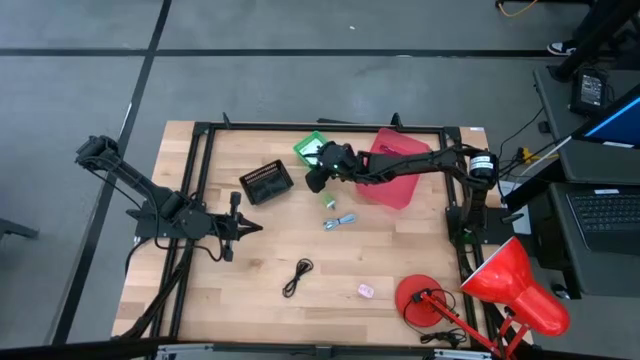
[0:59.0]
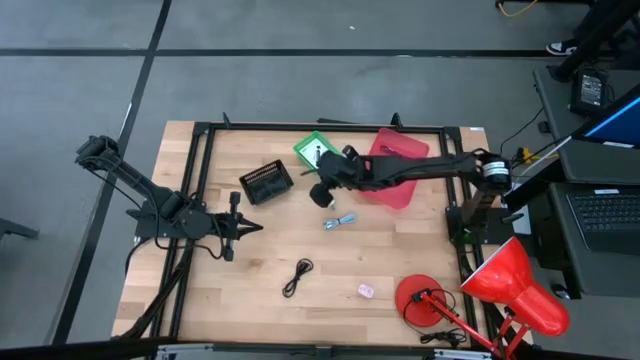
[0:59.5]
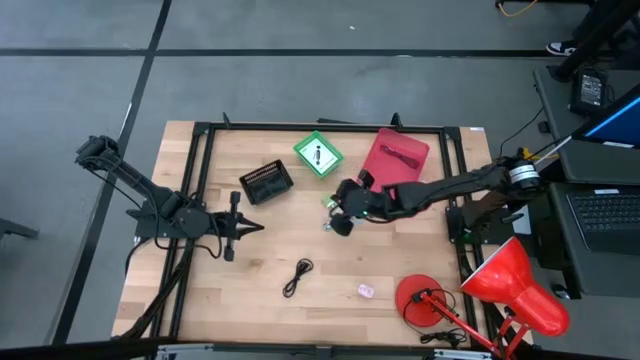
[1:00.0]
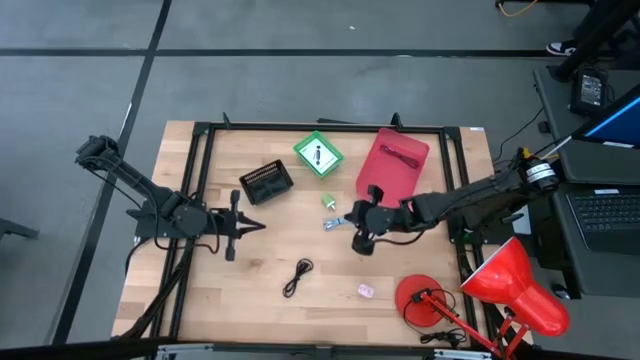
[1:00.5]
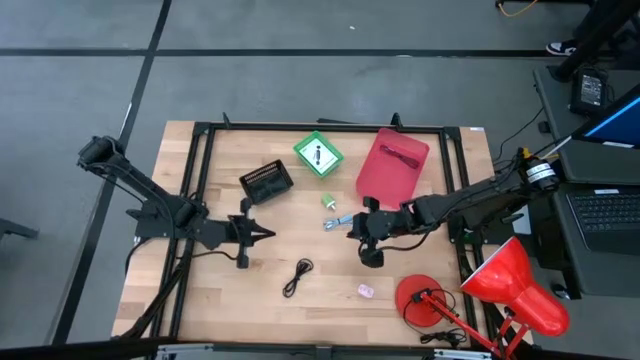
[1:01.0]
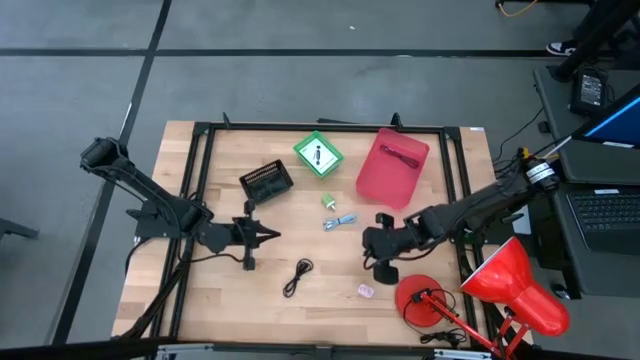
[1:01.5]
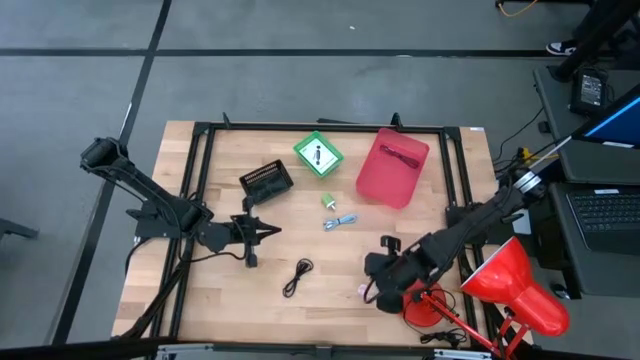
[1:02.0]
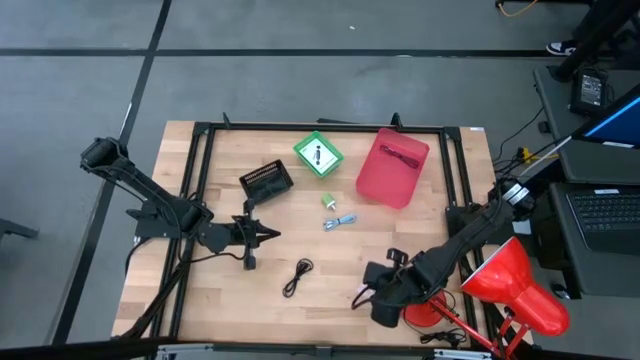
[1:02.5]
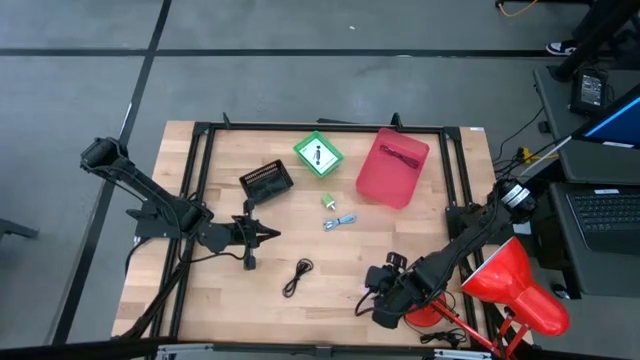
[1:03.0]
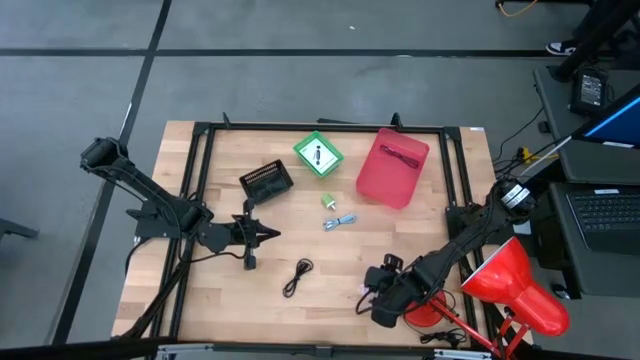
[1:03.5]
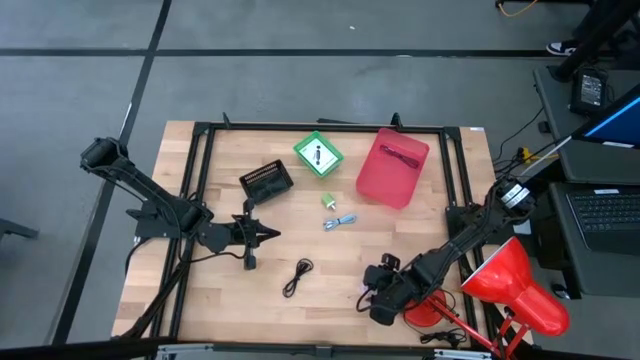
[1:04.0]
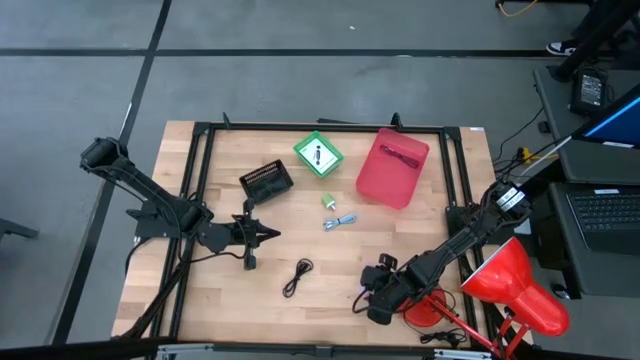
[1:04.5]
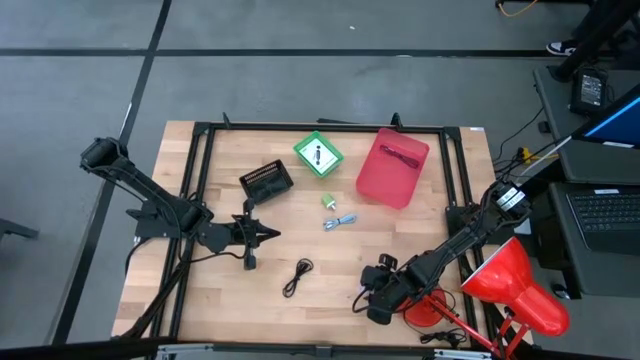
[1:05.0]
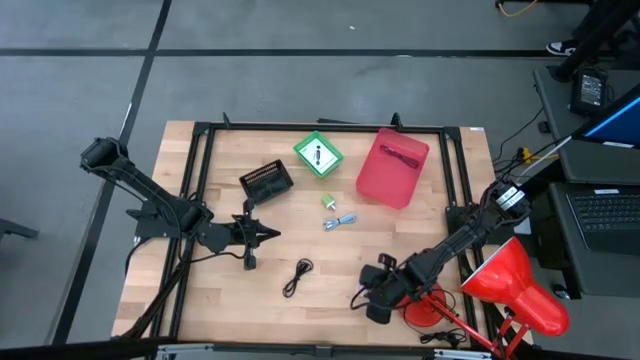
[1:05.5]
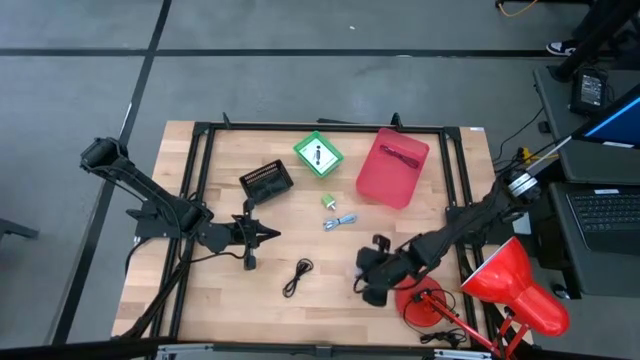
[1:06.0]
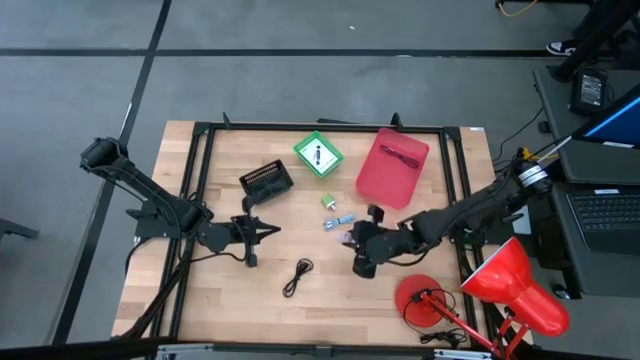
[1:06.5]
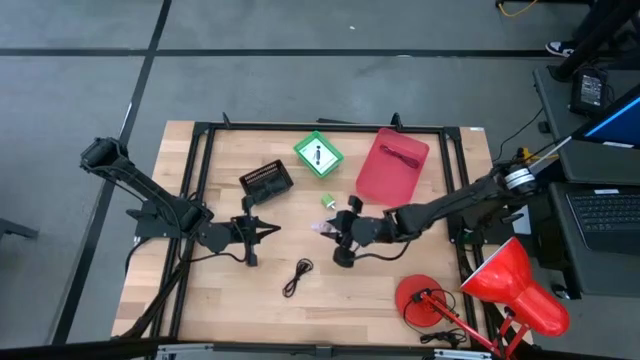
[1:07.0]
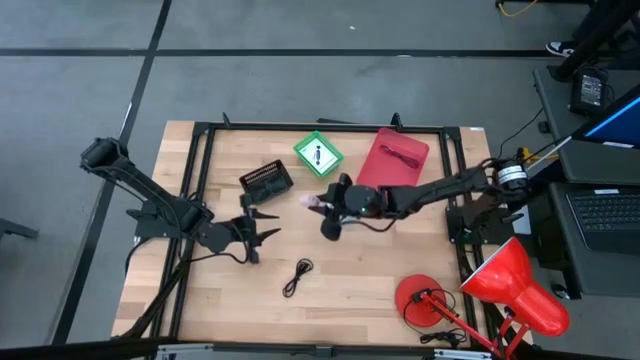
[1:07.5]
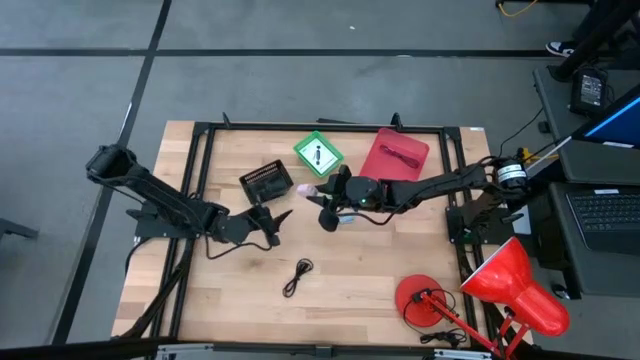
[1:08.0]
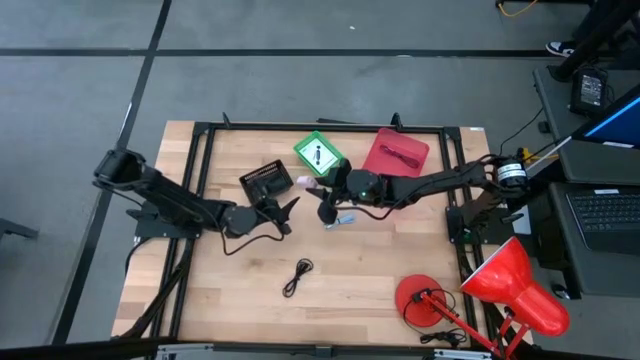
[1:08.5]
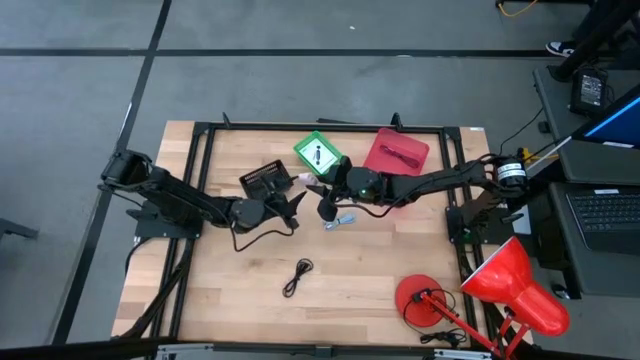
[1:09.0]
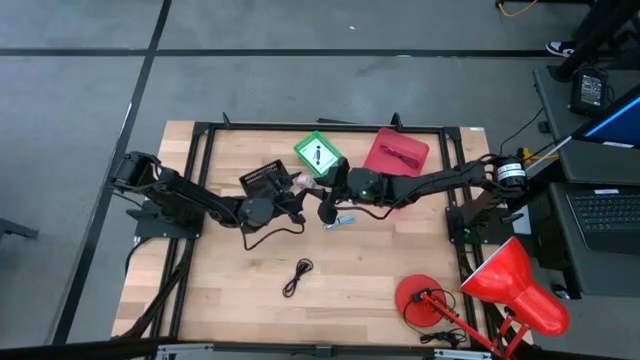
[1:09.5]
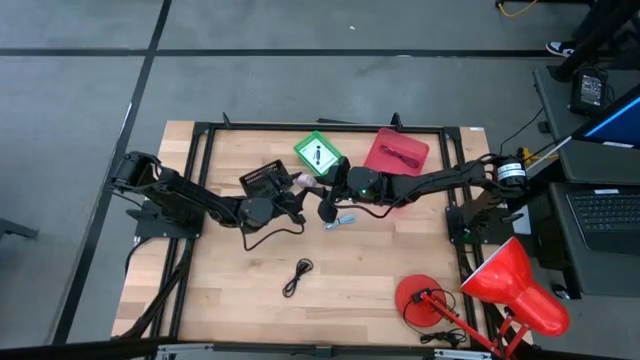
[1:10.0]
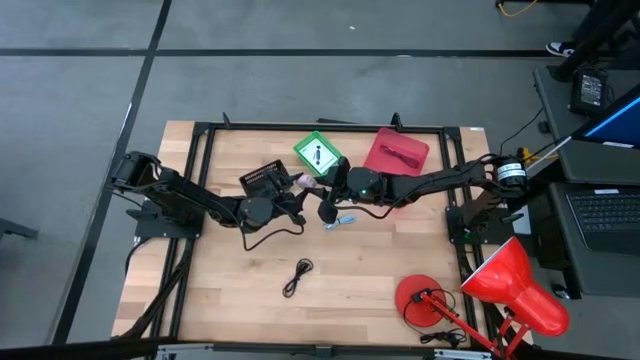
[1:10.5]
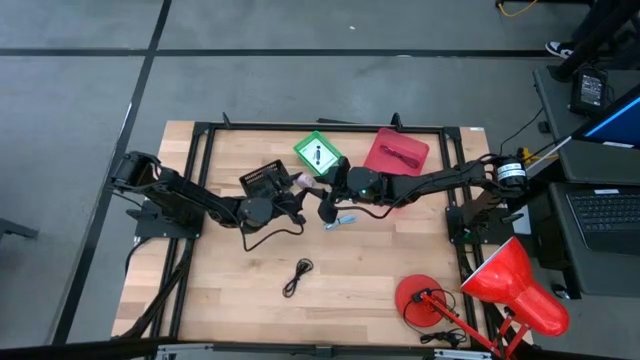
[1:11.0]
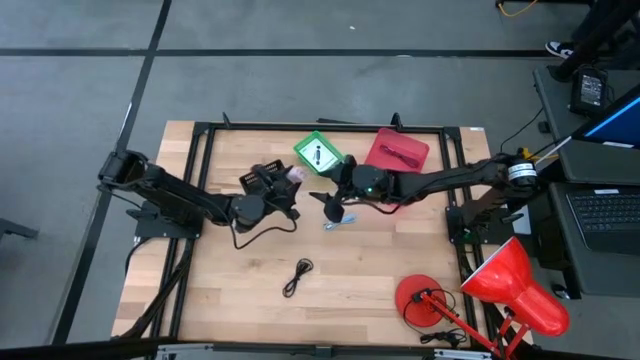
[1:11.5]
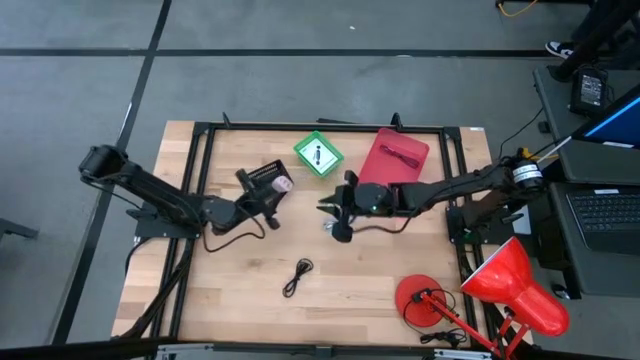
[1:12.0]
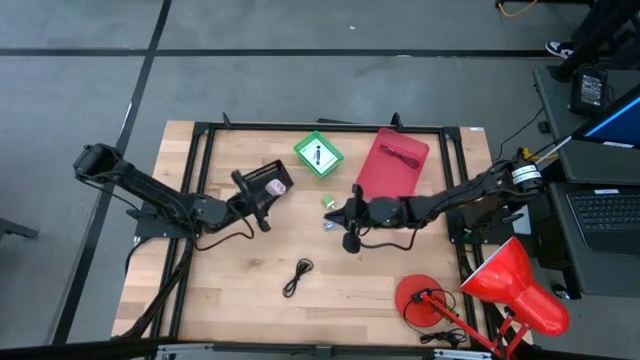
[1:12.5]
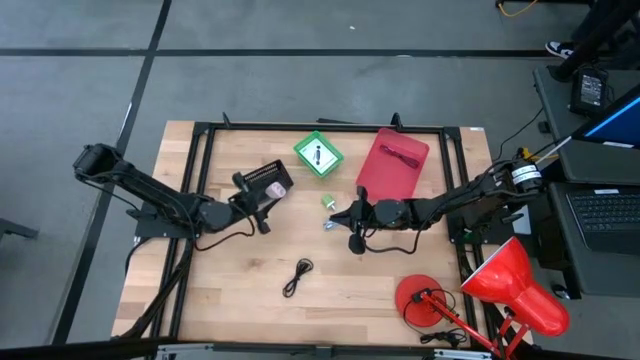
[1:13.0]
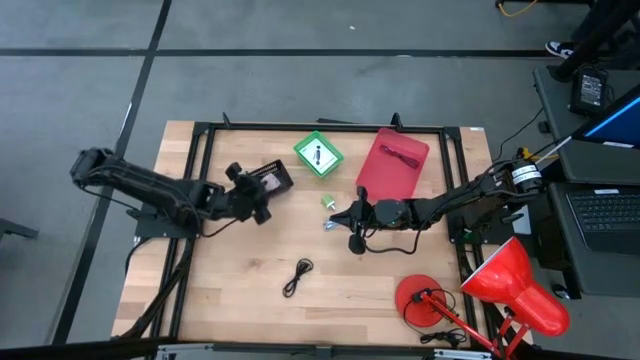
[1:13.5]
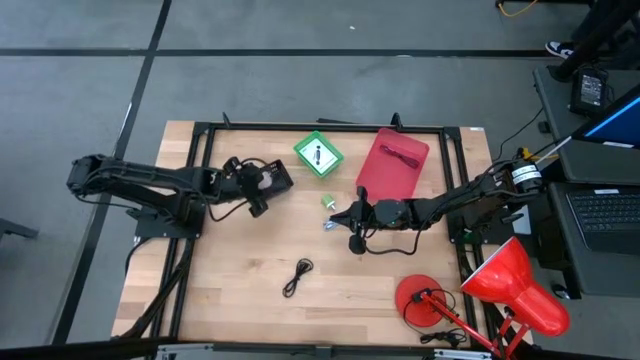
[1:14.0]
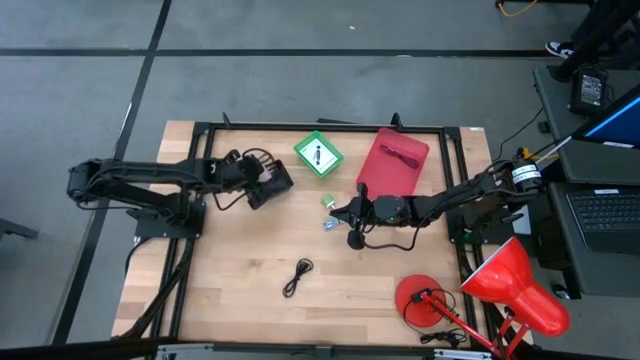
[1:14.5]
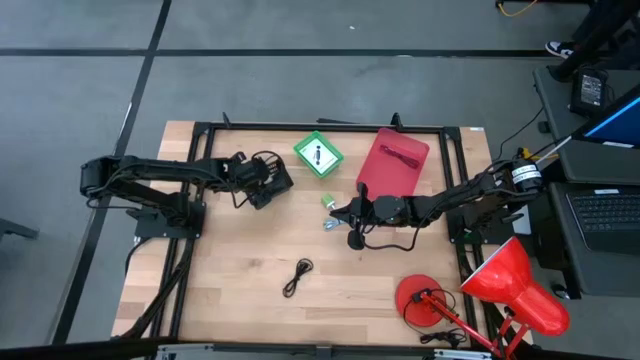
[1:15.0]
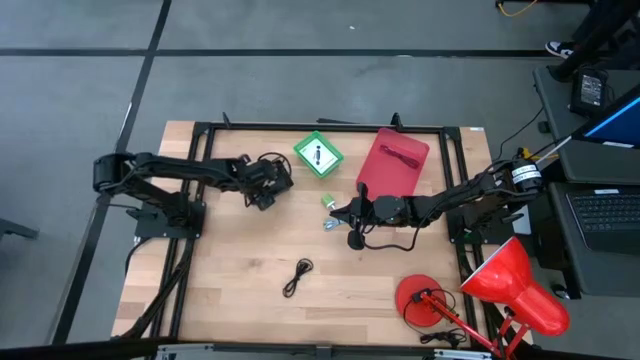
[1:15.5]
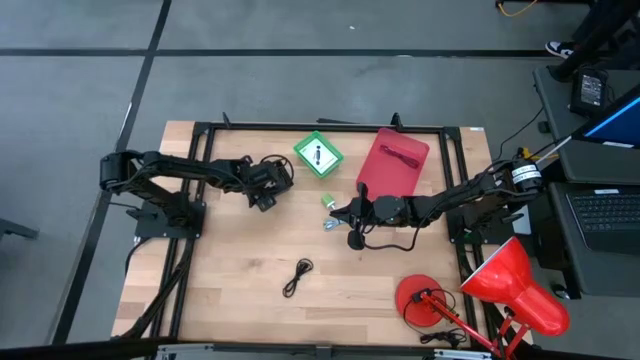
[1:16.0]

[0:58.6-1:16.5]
Task: Pick and place items into bin
Put the pink charger adapter into the black bin

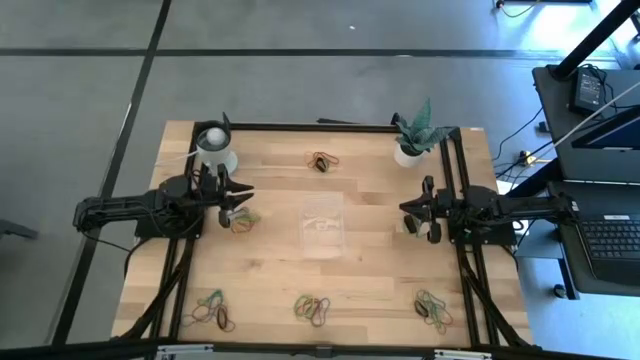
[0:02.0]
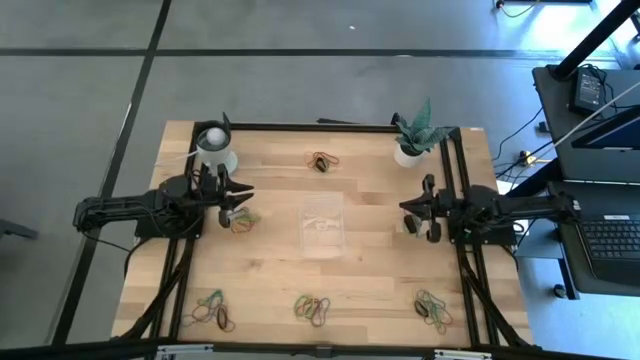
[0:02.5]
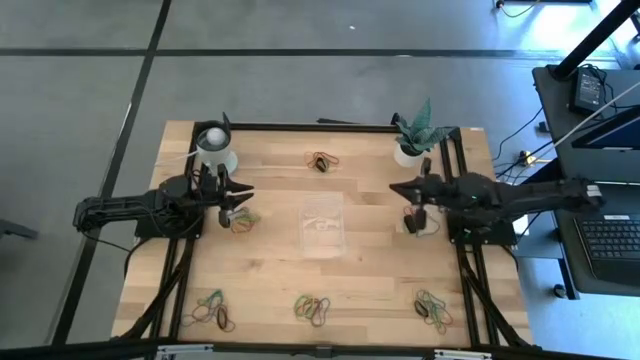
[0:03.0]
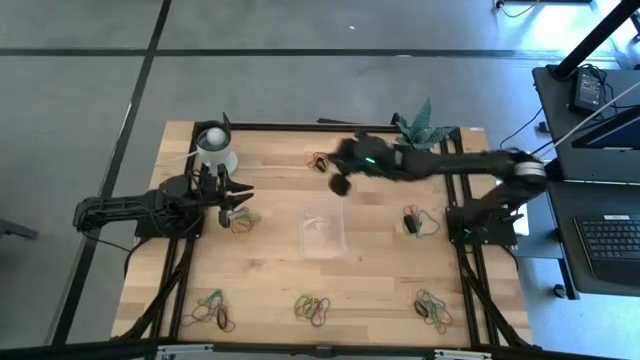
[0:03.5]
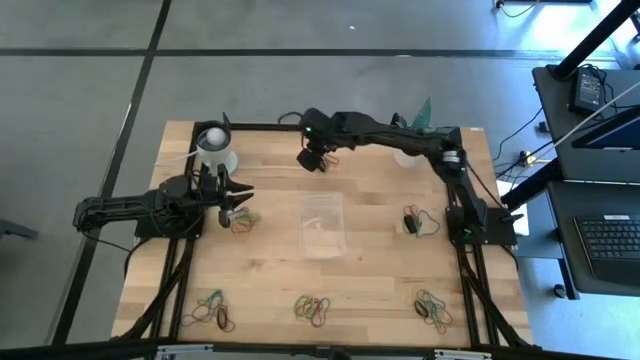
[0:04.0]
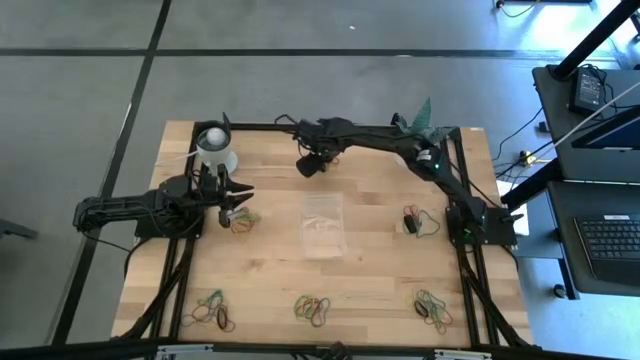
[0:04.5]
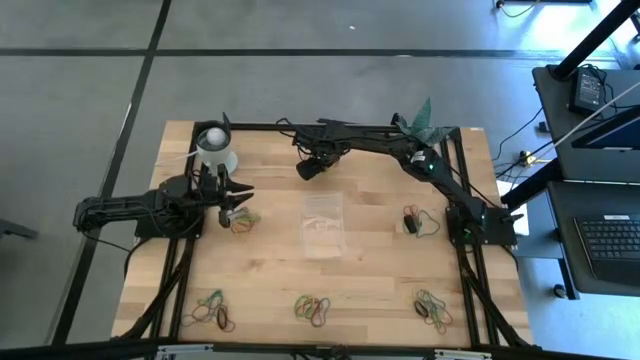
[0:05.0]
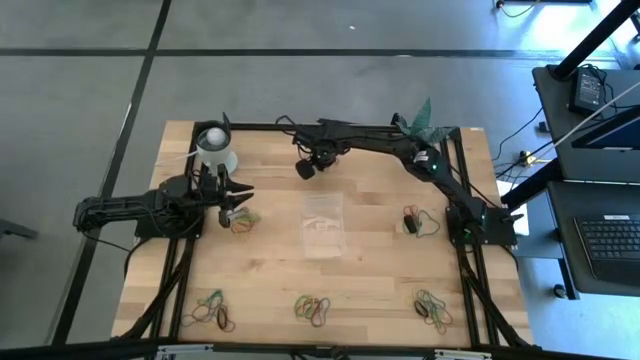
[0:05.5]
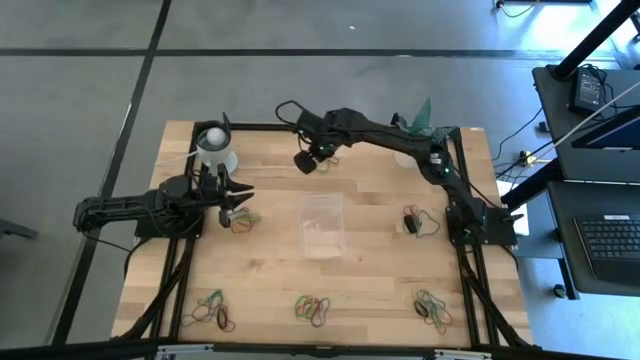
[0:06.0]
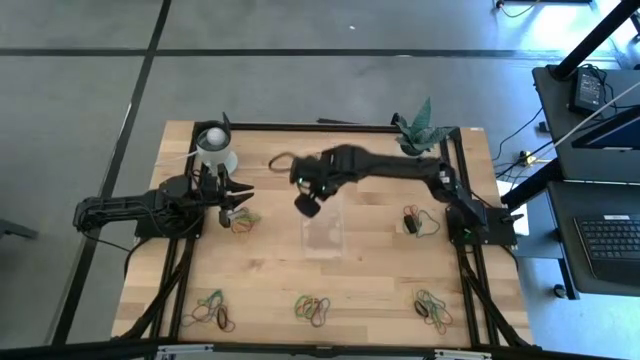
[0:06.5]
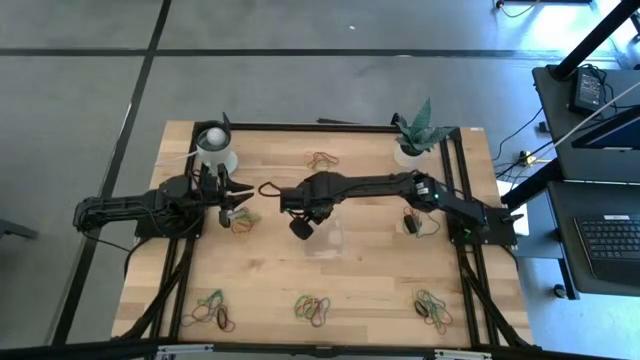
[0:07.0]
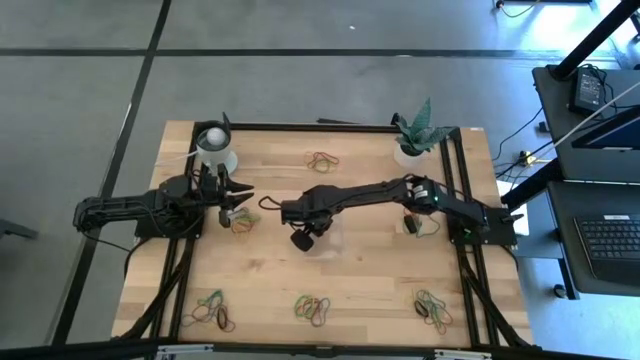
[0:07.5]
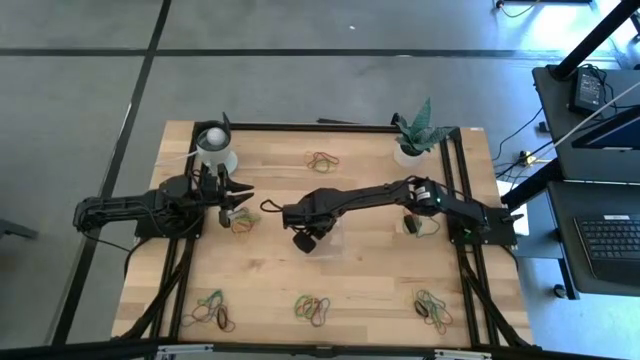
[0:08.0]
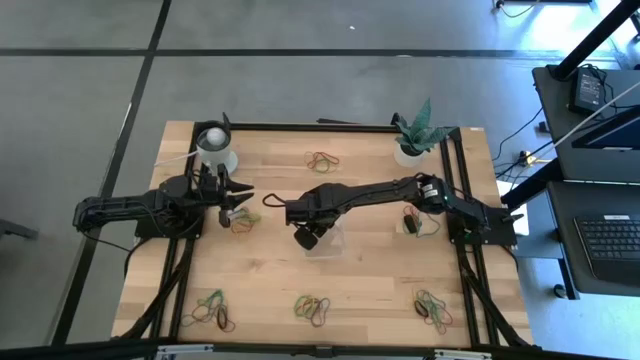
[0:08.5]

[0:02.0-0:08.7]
Task: Pick and place rubber bands into bin
Put the black rubber band into the transparent bin
